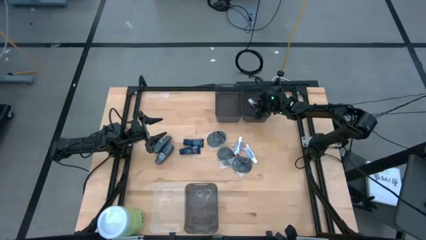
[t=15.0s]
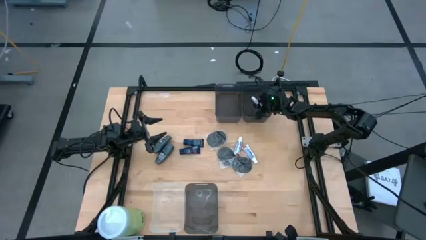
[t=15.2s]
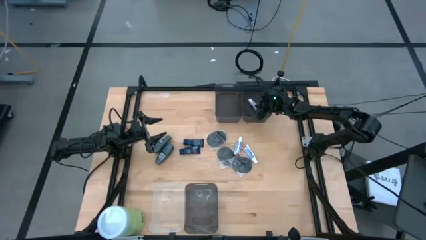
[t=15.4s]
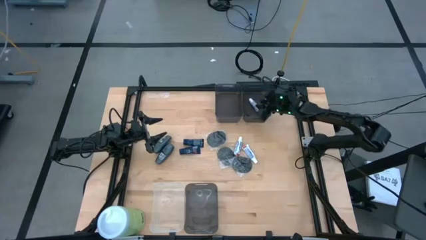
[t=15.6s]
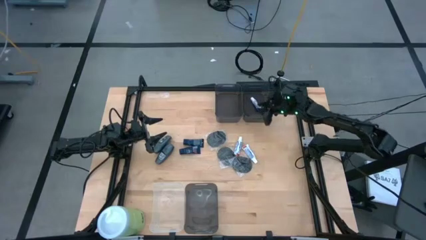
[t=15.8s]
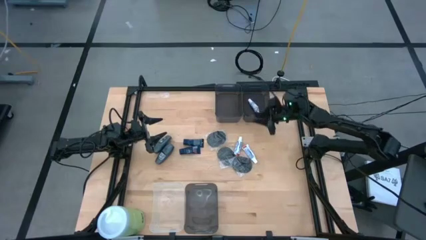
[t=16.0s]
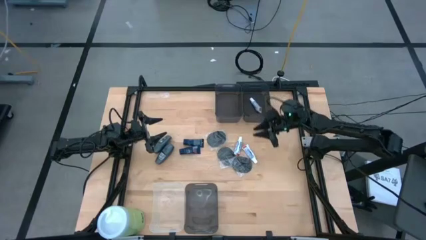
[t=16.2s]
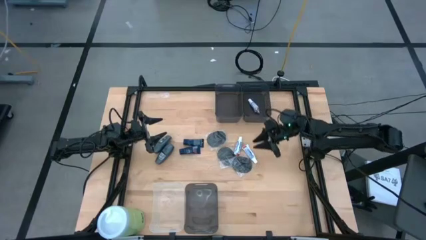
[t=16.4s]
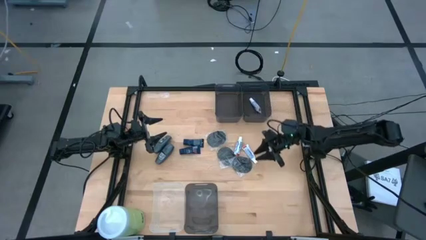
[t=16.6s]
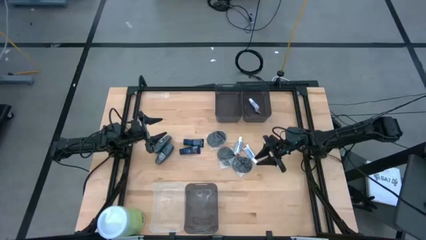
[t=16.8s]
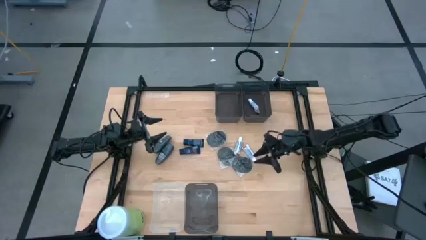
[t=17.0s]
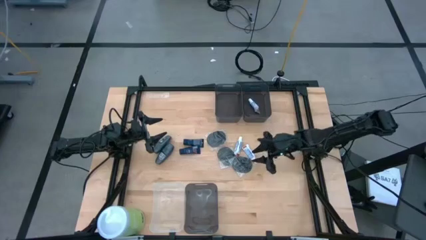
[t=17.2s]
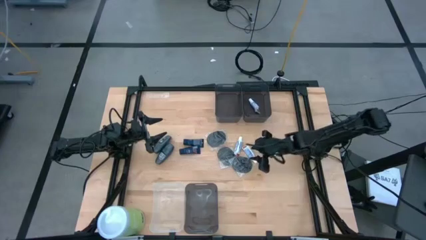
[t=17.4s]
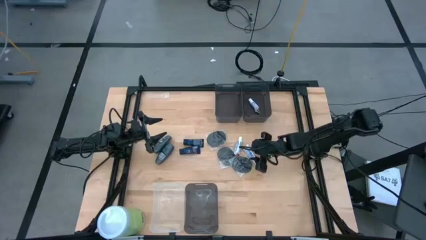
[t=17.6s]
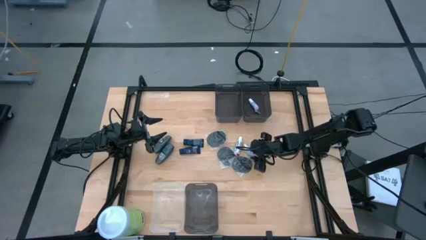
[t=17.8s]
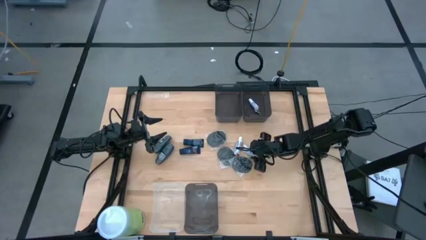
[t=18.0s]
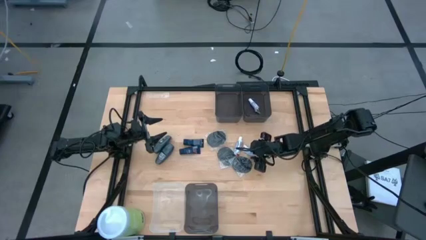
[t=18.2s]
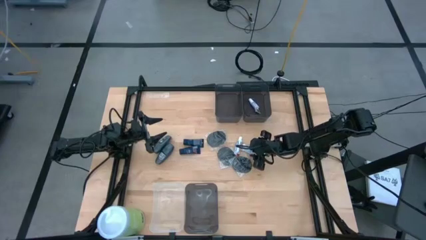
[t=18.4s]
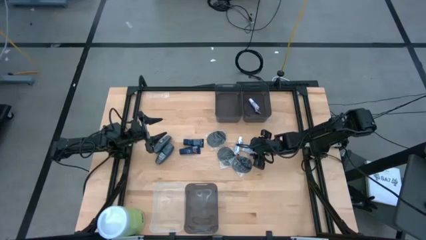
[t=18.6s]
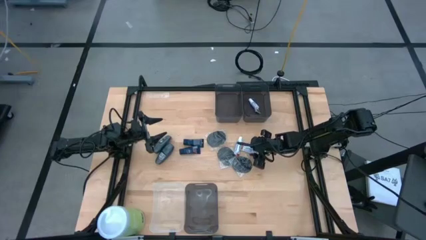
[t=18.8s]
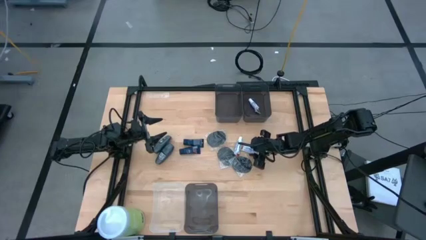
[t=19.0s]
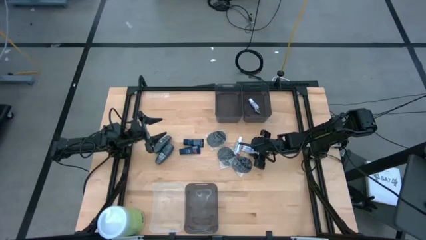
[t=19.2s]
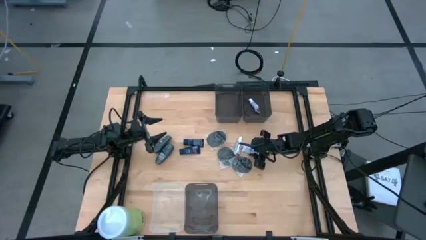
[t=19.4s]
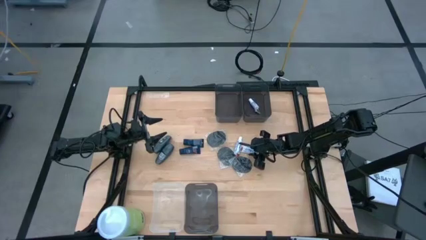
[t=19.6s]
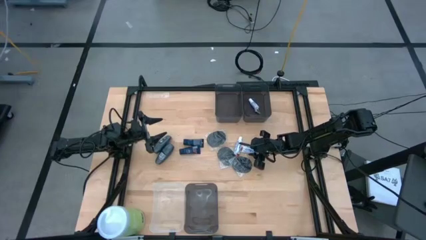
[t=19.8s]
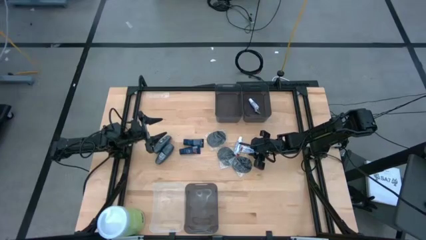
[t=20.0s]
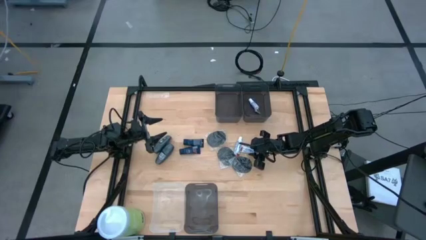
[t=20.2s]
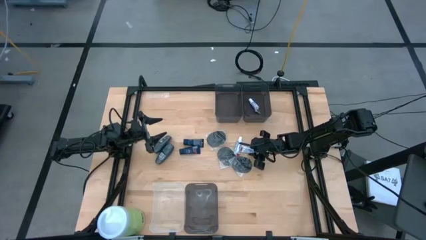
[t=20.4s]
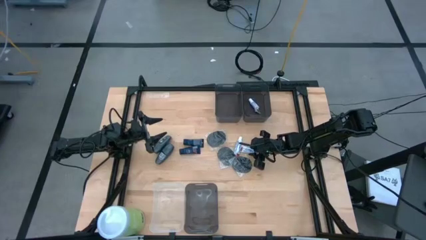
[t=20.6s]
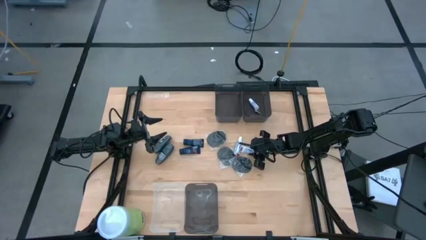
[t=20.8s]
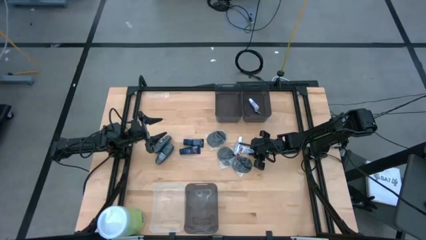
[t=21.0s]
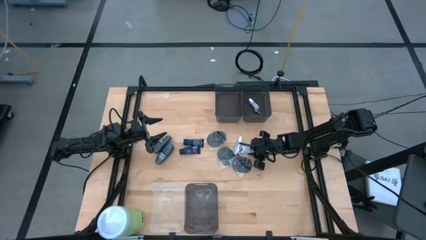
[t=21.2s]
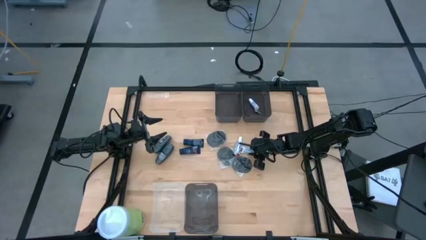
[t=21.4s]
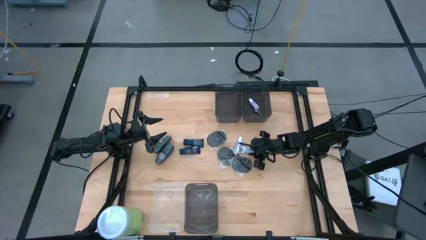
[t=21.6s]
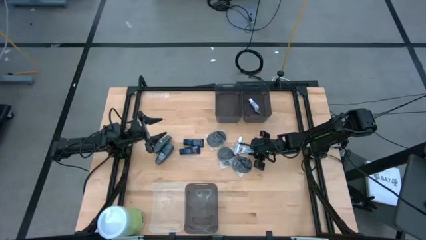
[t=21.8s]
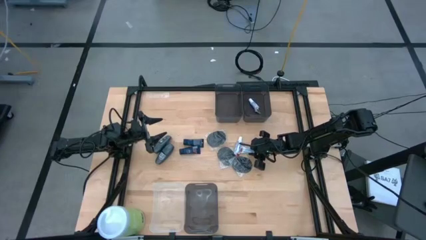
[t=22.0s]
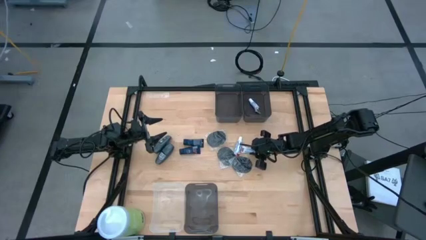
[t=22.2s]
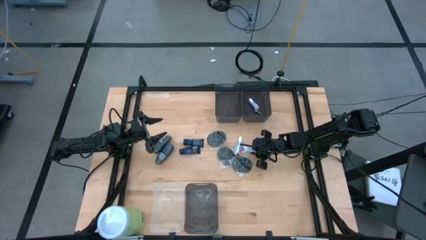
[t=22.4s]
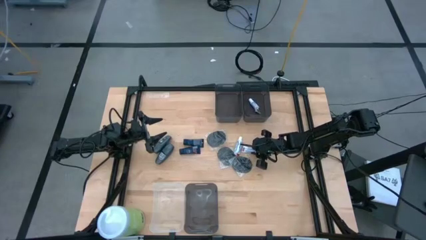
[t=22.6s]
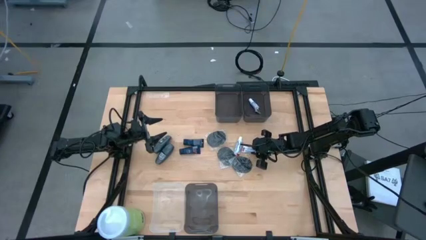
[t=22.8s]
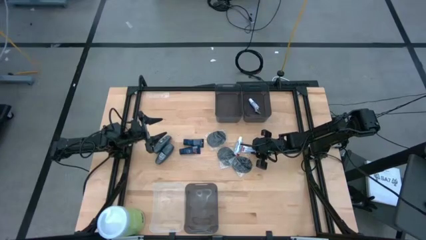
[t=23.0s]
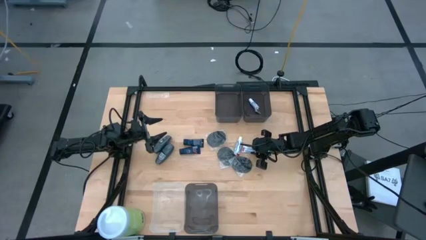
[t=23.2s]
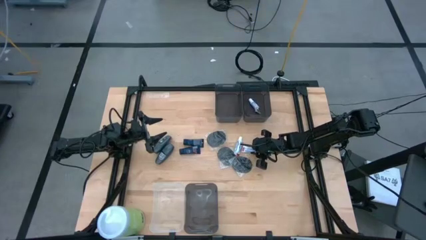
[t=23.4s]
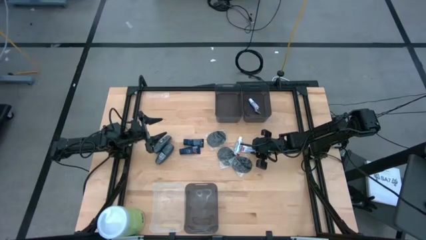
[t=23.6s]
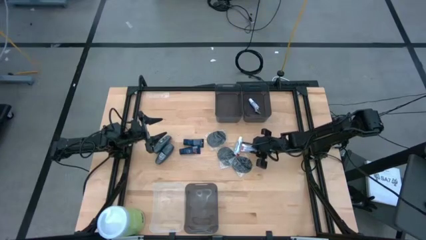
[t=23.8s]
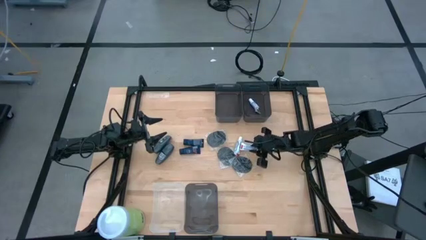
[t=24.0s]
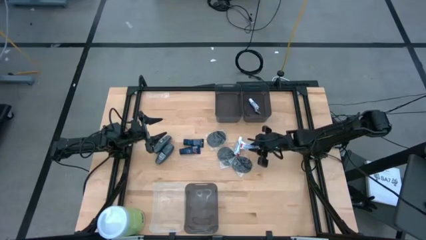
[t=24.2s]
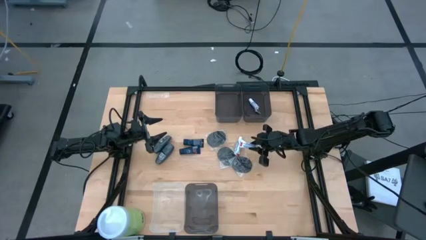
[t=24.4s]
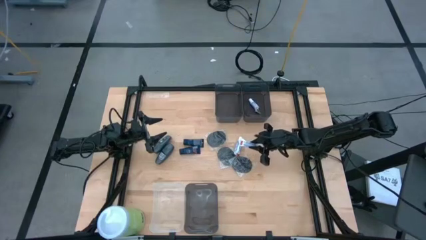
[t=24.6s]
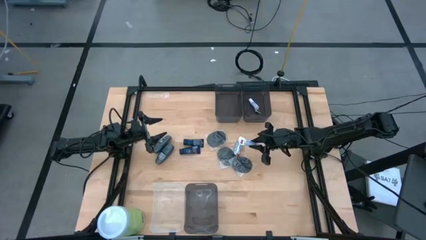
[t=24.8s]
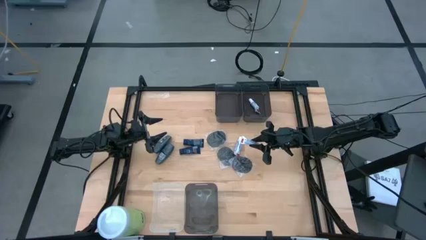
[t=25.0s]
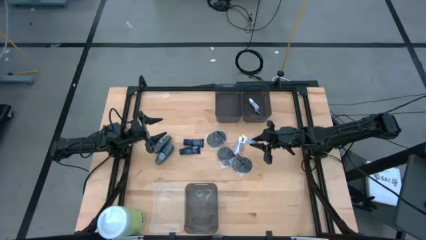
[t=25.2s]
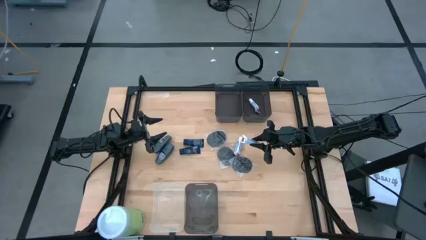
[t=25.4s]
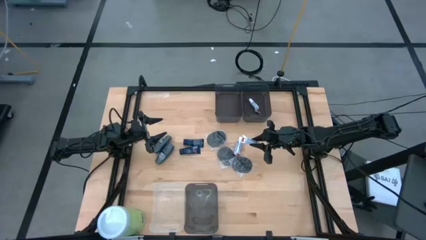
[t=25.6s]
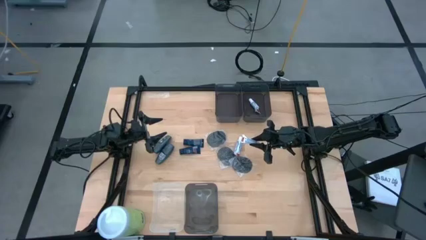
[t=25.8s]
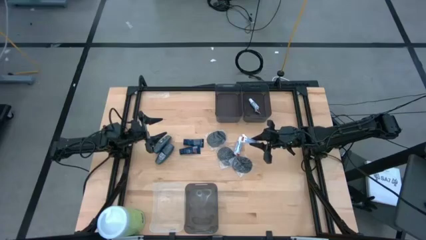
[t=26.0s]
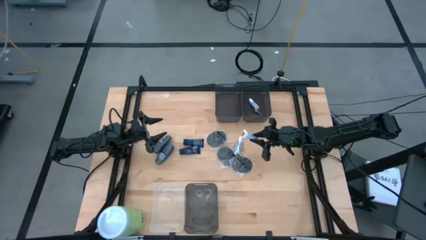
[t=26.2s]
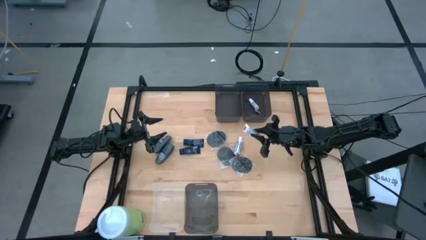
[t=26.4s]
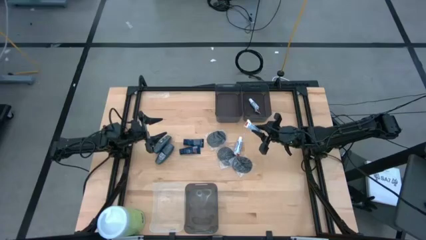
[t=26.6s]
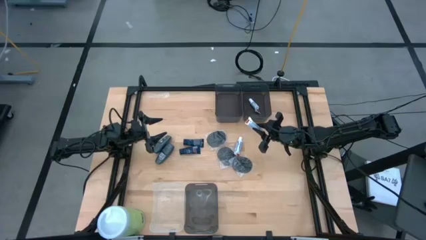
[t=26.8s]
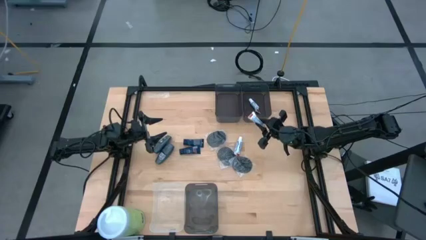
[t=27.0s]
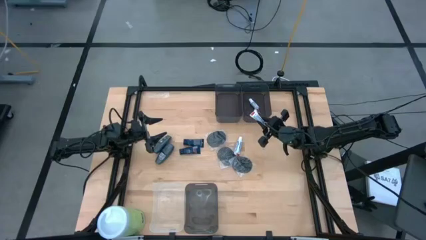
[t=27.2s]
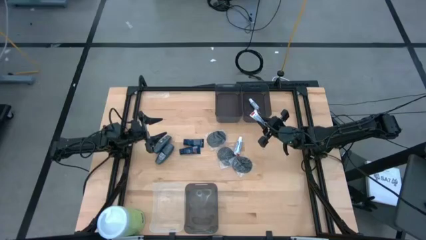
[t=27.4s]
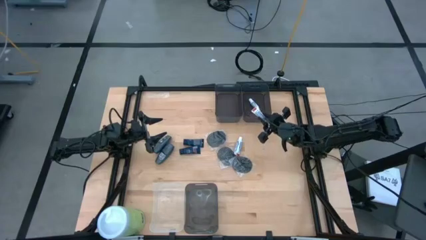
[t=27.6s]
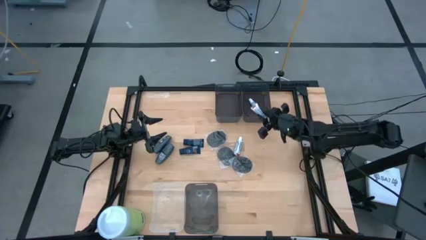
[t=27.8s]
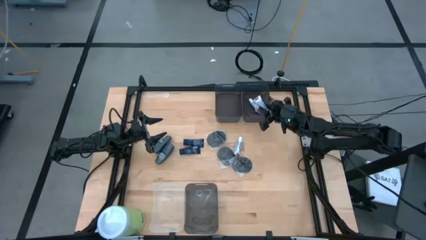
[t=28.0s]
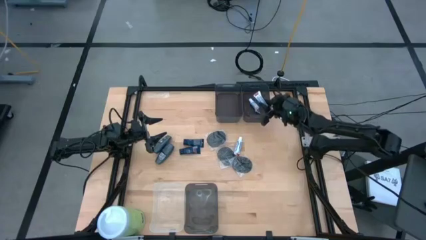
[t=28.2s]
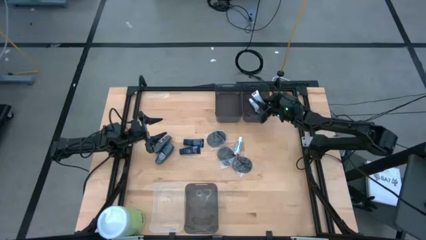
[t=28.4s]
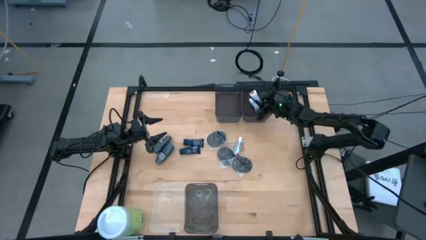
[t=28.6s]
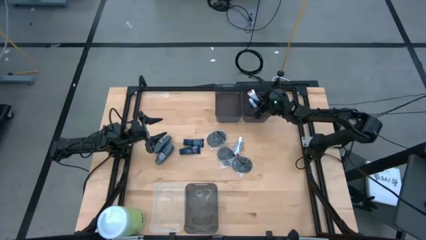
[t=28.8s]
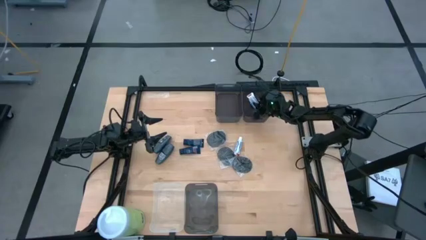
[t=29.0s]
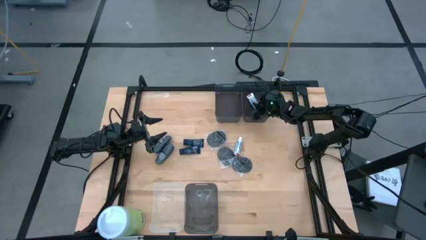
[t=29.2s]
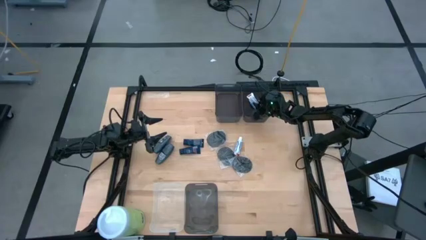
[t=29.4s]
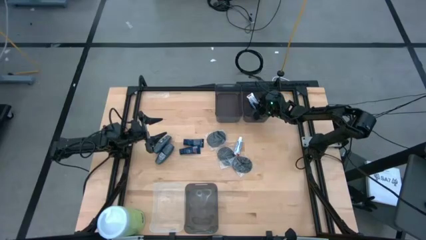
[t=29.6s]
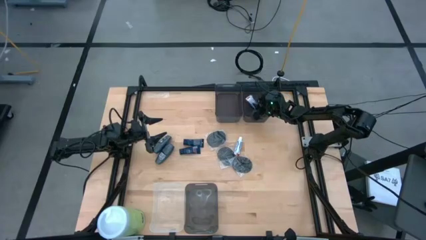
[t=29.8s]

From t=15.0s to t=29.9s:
Task: Pick & Place Travel size toiletries
Put the right toothpaste into the top right black bin

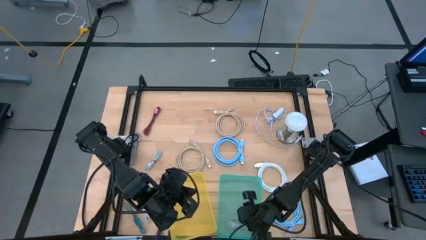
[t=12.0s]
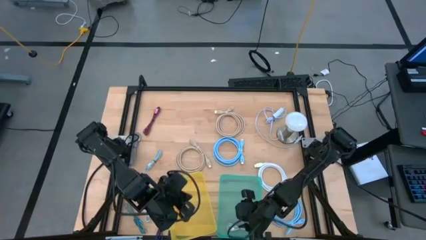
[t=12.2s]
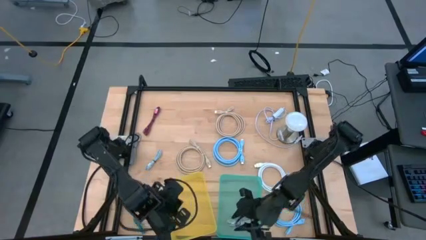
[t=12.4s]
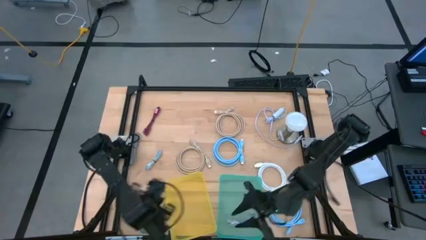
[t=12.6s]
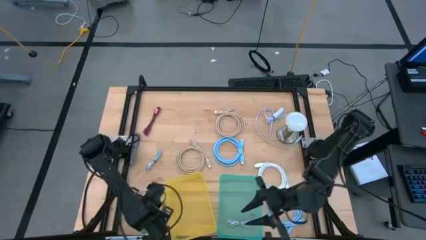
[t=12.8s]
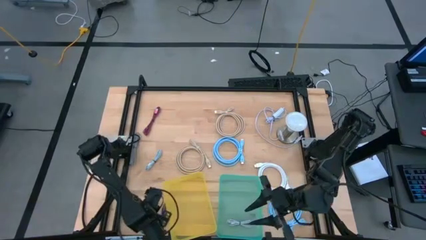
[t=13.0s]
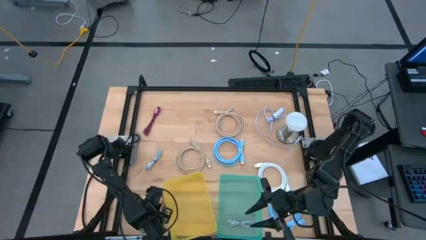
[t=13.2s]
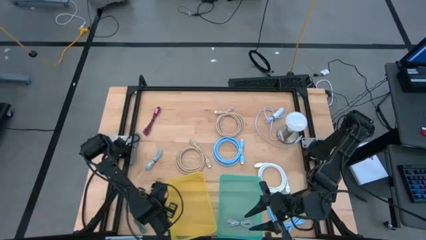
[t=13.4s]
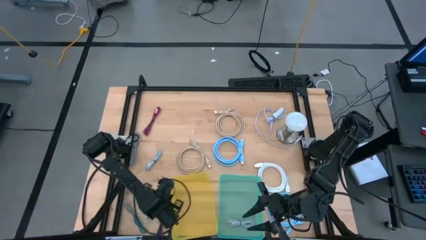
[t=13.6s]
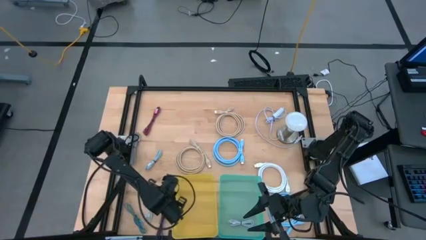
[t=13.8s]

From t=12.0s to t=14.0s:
Task: Pick & Place USB Port
Adjust the yellow bin
